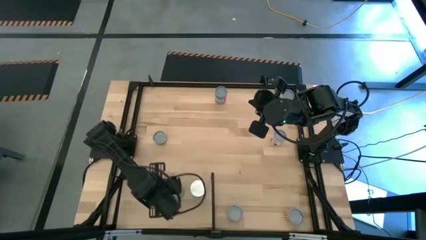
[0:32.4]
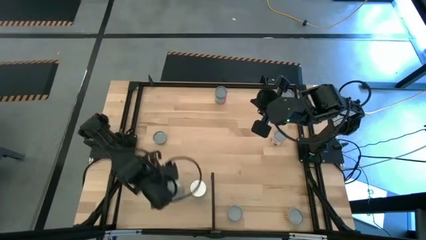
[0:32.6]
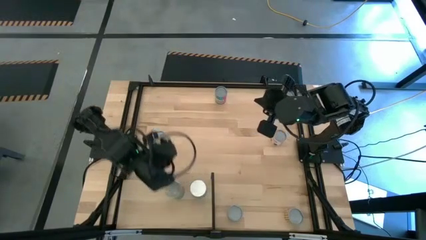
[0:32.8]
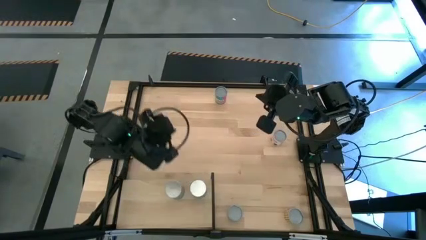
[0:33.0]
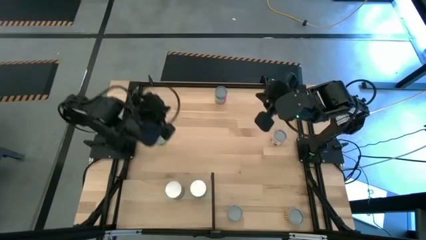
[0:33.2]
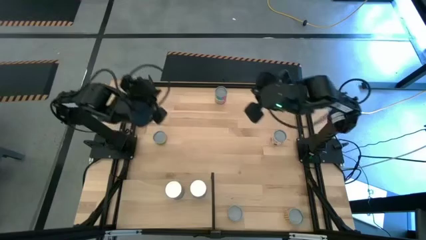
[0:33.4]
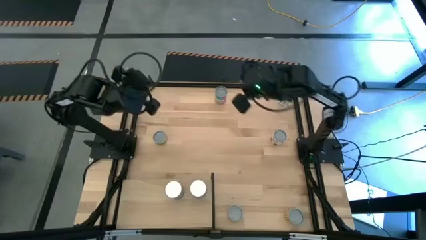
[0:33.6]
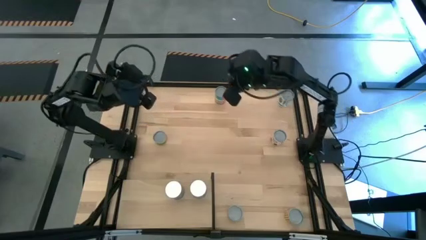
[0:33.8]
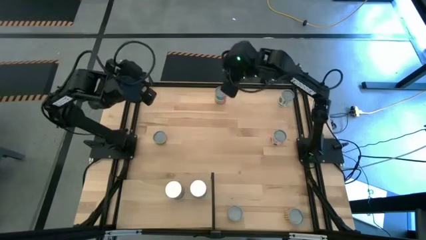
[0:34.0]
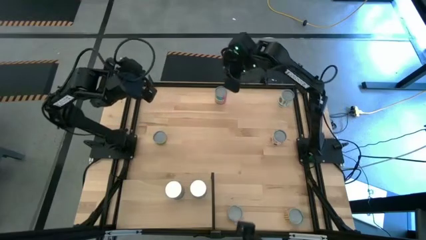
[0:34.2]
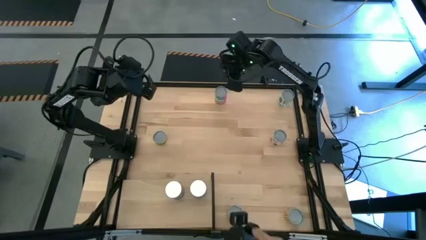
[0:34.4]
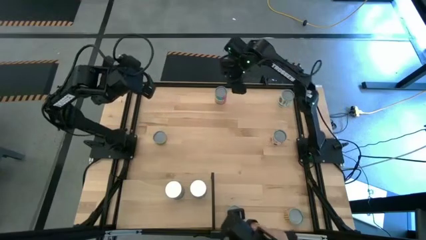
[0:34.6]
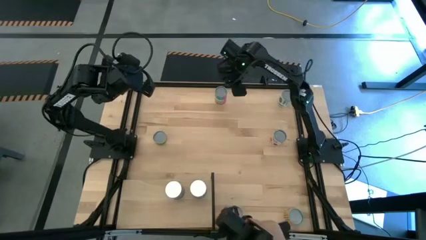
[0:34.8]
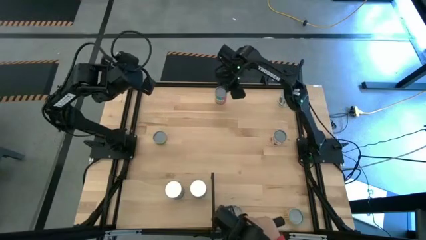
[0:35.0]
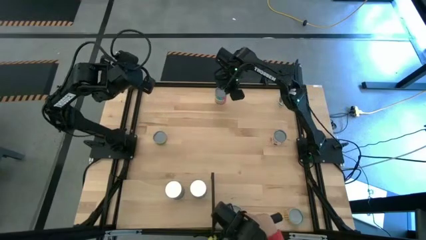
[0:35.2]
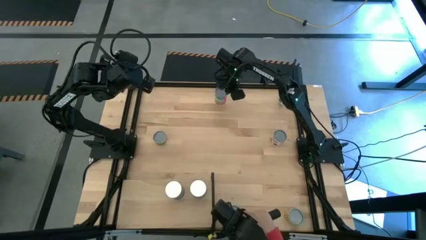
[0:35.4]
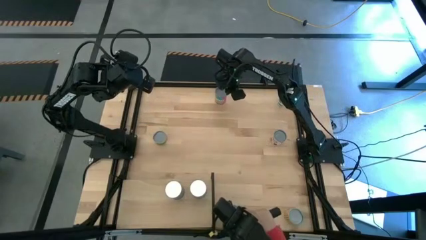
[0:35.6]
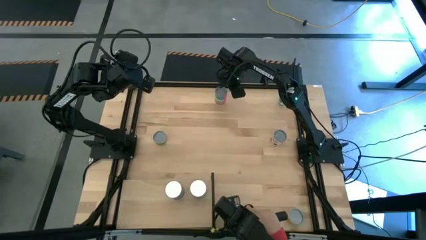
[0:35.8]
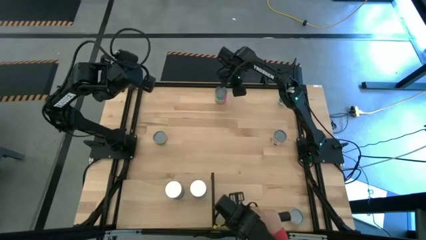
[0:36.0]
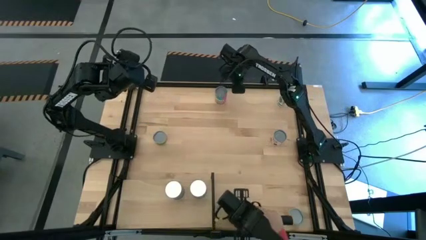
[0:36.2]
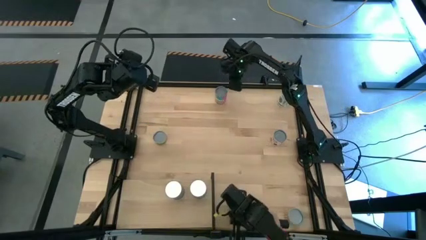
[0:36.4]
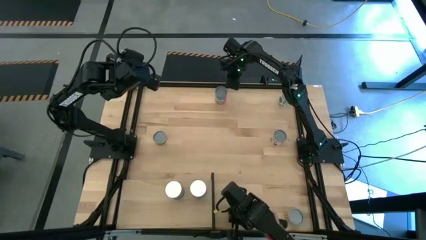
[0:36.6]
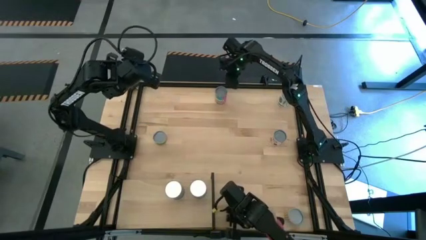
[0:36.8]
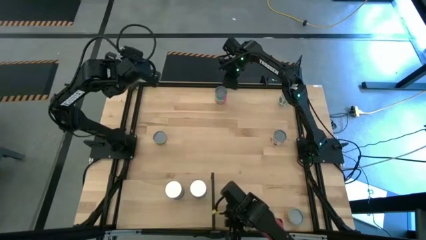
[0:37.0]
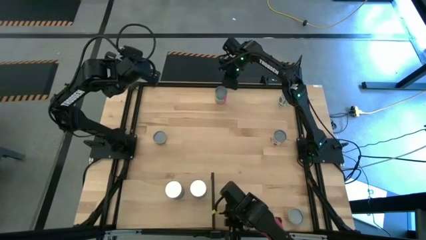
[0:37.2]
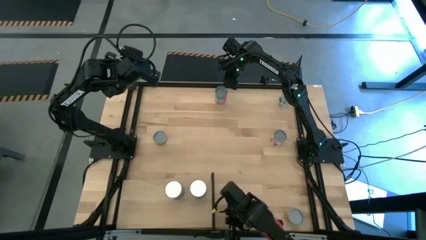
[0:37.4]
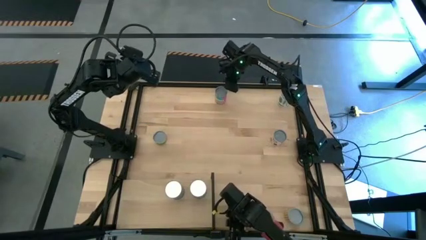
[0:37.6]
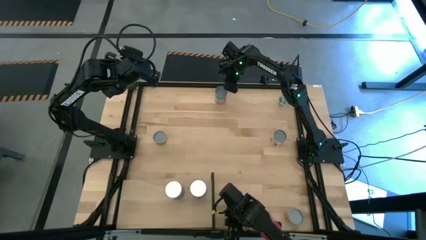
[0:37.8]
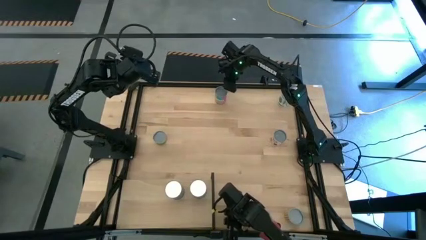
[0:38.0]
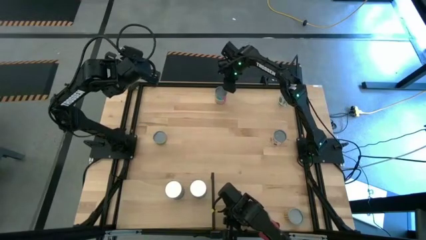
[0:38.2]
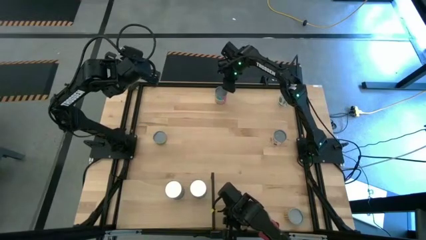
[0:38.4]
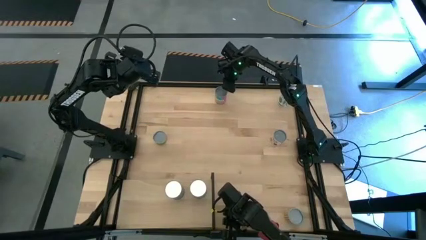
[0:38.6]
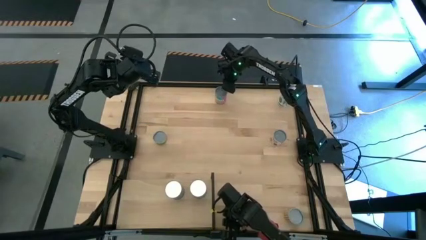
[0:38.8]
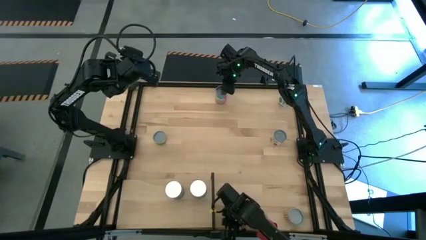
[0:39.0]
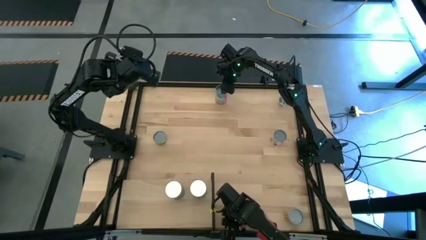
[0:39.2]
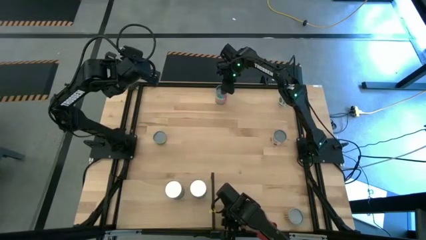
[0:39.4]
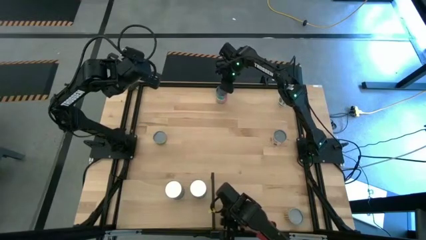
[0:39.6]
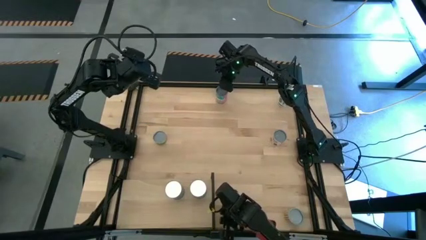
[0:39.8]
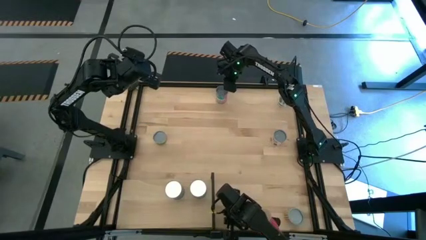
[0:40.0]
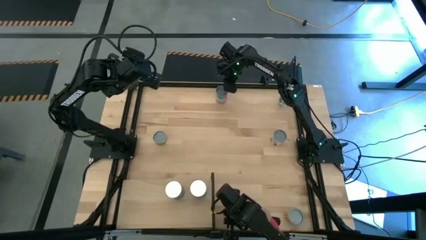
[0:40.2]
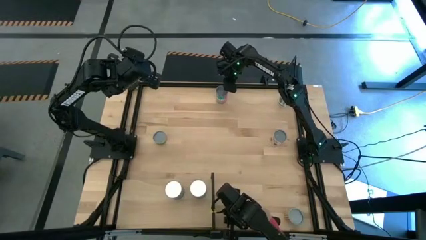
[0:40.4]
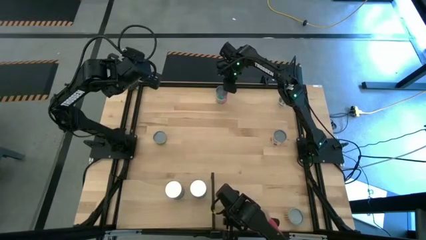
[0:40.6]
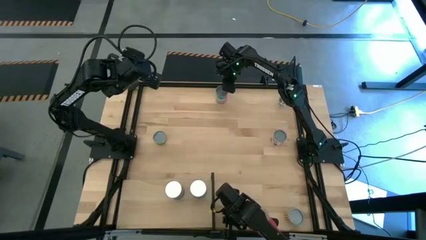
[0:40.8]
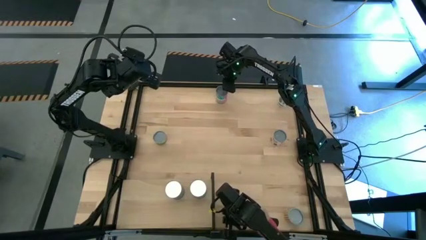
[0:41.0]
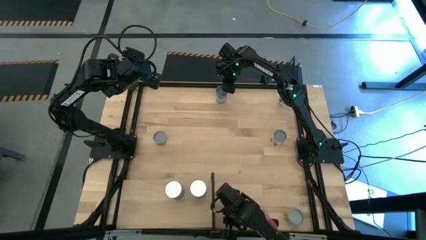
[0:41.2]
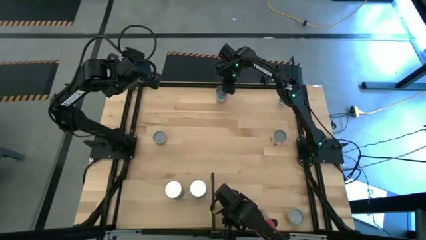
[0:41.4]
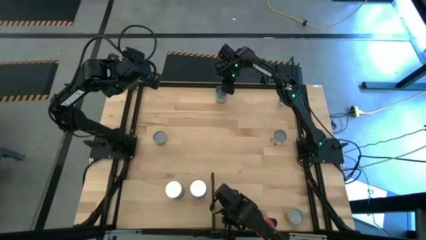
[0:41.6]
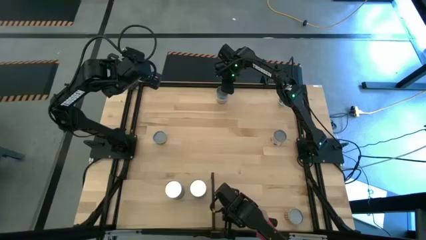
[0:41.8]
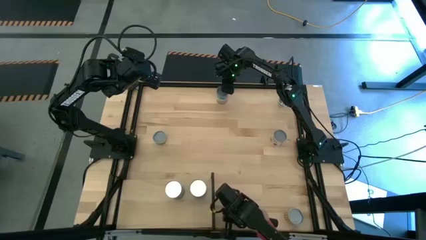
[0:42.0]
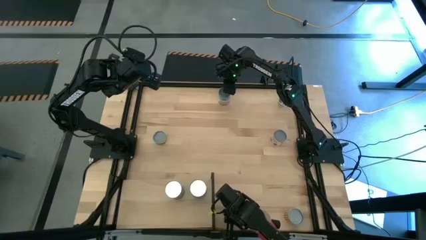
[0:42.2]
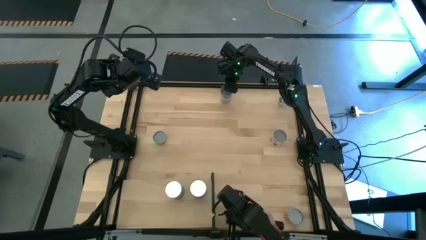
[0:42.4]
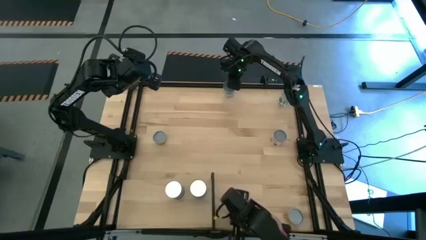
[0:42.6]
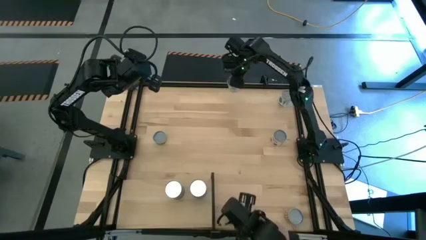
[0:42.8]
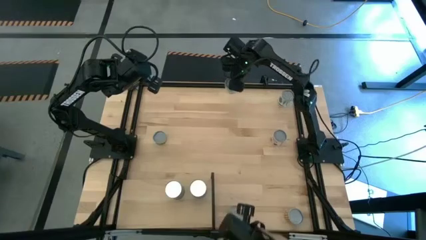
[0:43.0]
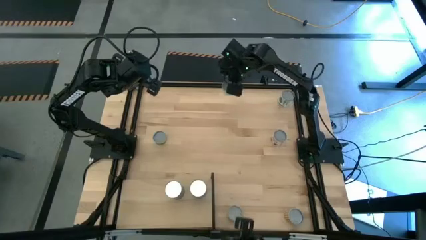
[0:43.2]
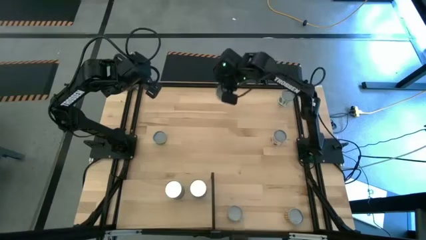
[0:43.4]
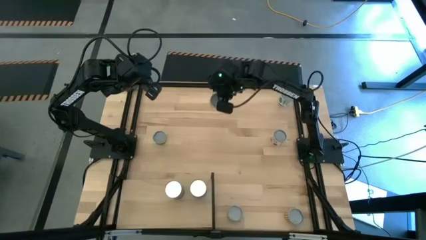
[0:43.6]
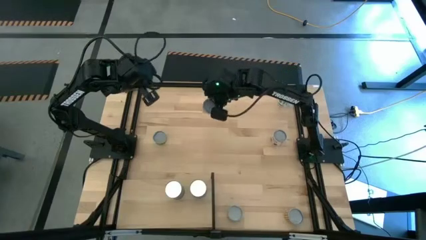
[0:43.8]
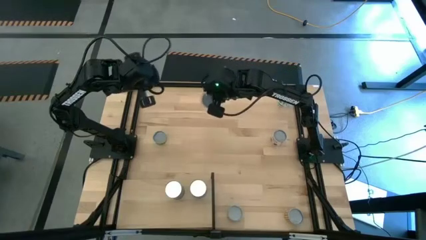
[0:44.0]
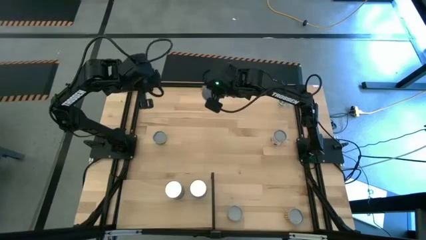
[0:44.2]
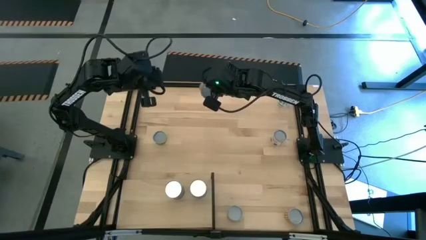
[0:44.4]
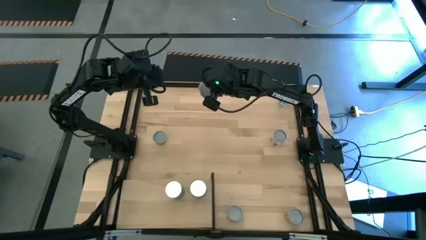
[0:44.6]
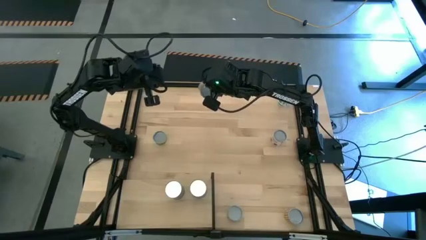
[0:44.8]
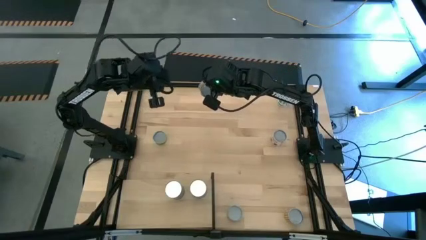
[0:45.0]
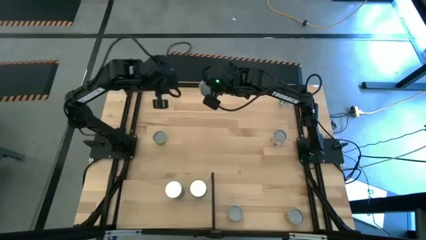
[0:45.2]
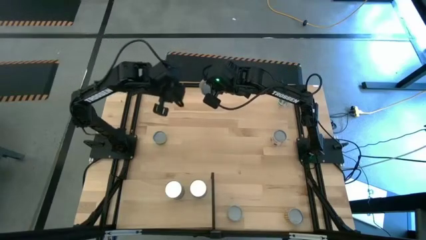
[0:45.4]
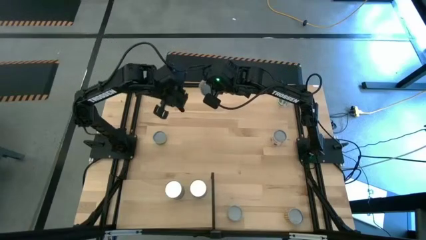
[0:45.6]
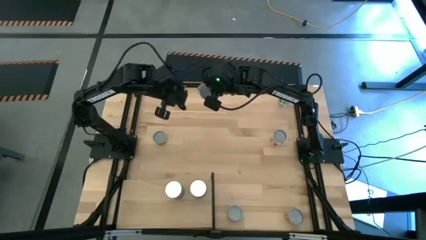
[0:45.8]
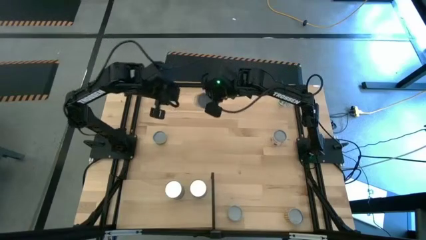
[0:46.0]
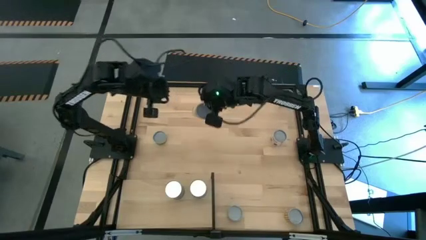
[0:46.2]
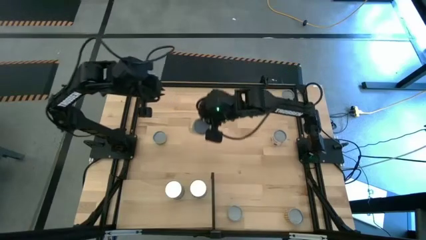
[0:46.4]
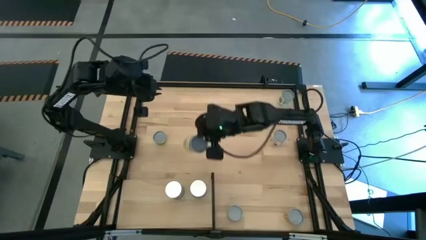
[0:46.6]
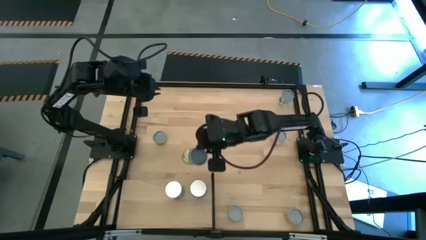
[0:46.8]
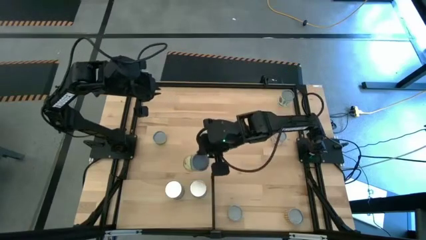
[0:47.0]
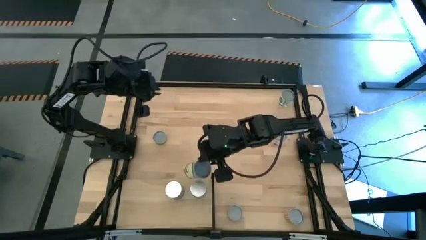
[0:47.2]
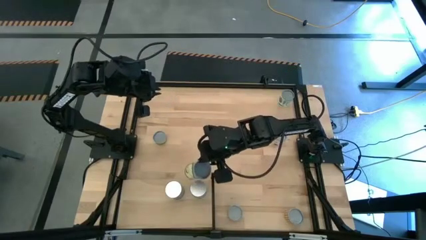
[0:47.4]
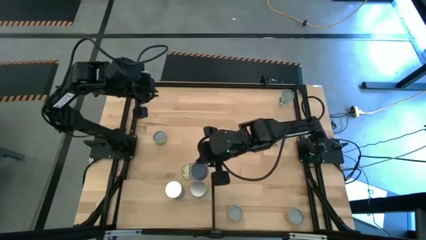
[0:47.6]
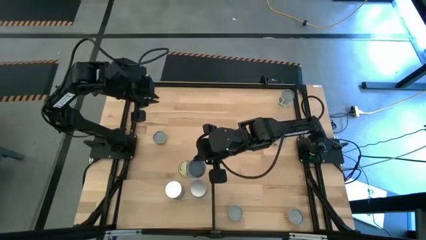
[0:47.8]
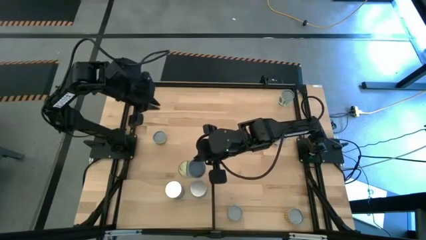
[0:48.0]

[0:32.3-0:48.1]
Task: Pick and place cans onto a shelf
Put the canned chicken soup on the shelf
